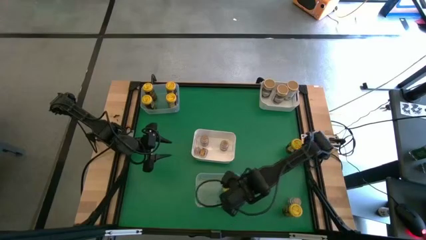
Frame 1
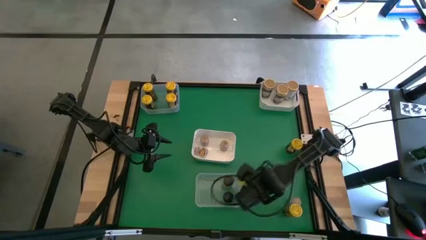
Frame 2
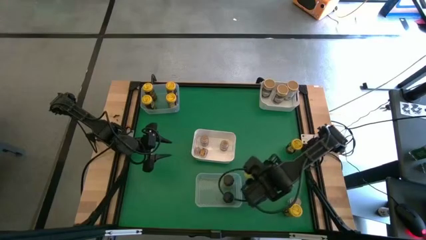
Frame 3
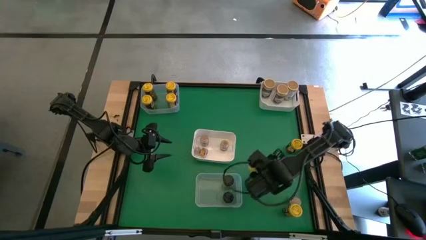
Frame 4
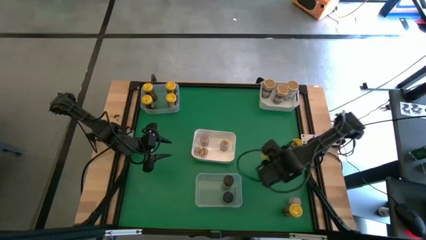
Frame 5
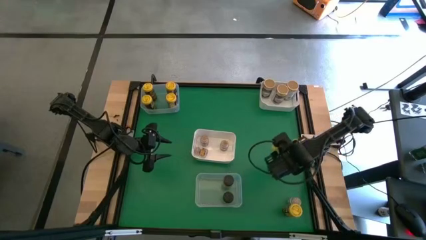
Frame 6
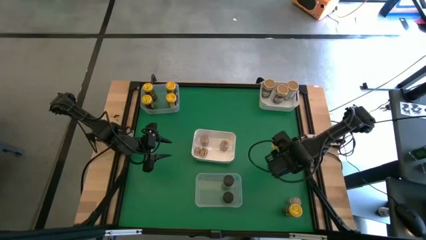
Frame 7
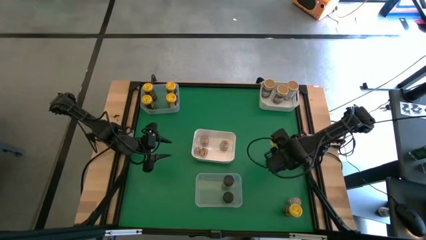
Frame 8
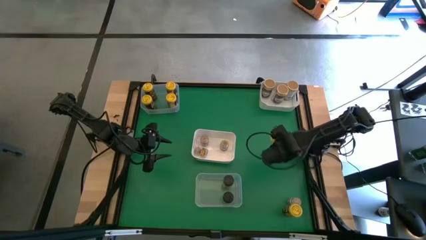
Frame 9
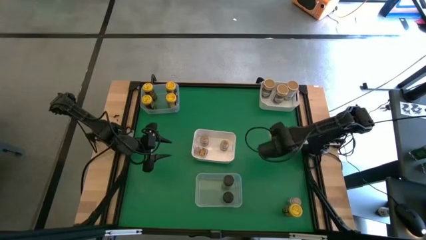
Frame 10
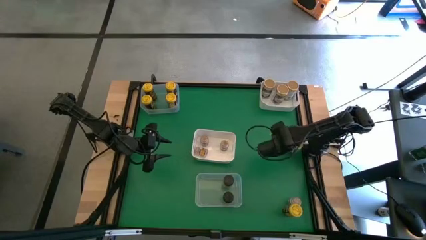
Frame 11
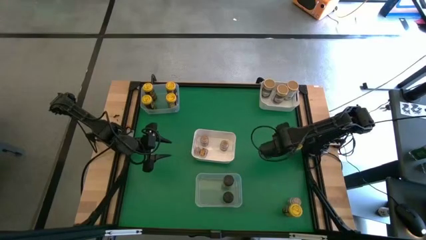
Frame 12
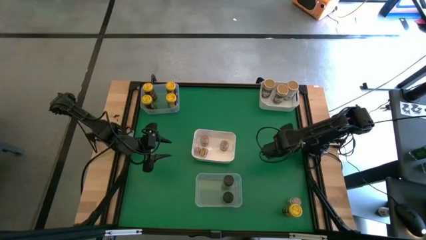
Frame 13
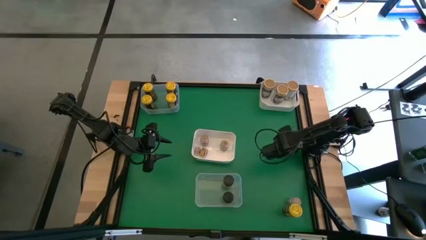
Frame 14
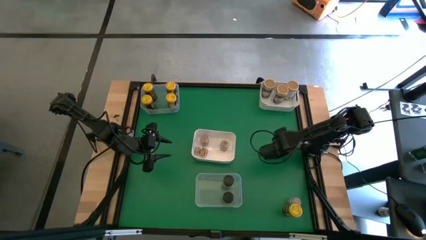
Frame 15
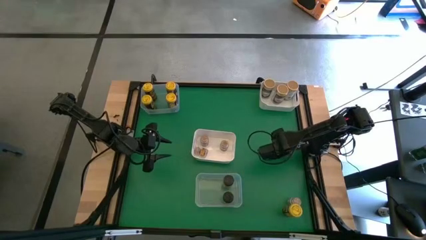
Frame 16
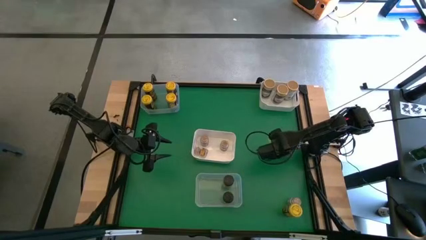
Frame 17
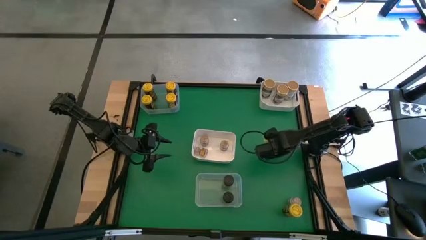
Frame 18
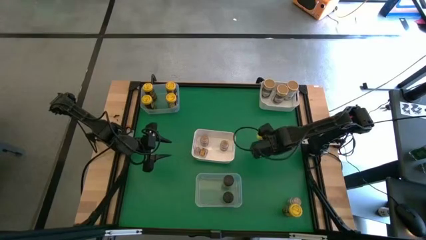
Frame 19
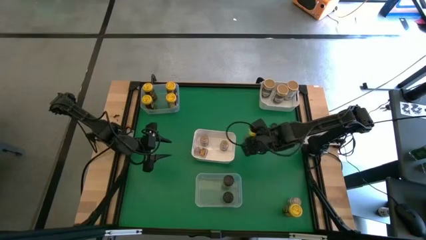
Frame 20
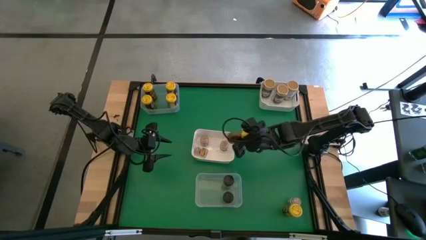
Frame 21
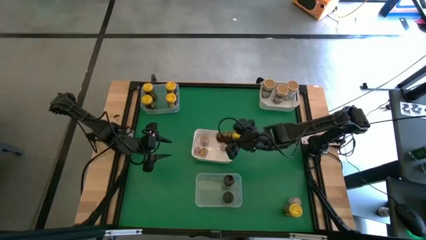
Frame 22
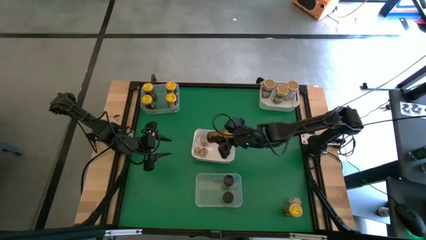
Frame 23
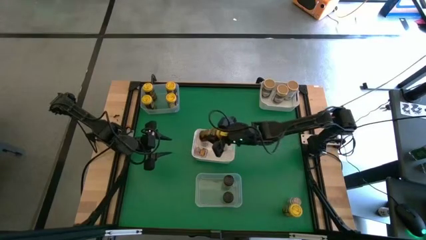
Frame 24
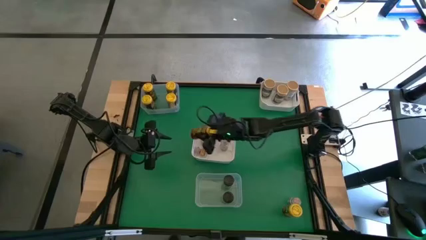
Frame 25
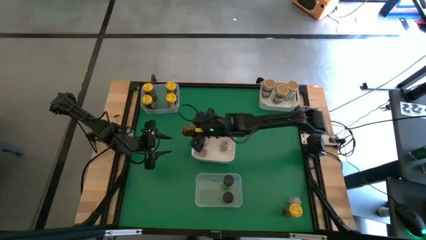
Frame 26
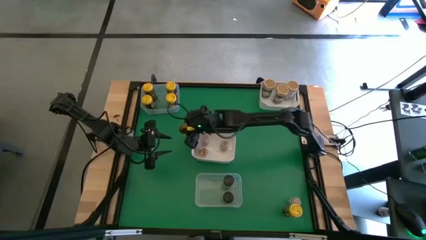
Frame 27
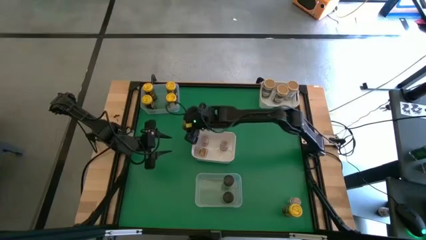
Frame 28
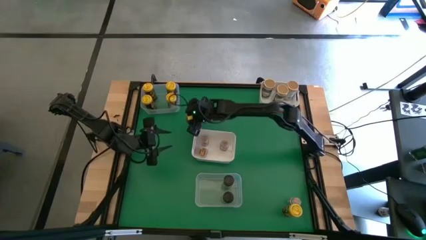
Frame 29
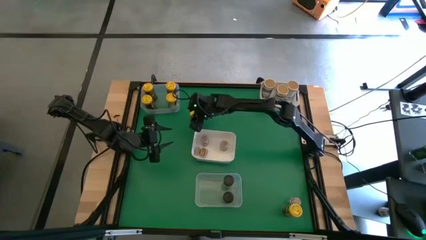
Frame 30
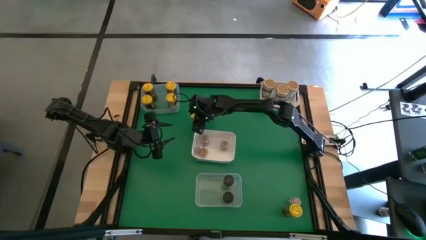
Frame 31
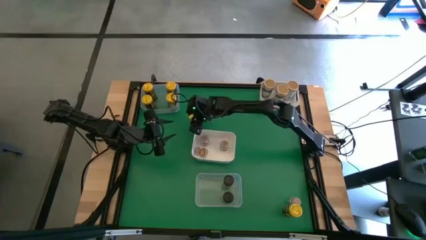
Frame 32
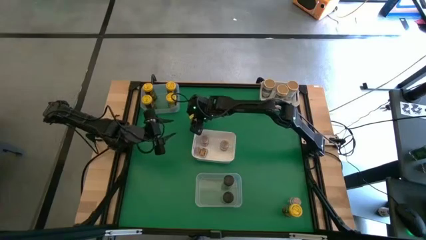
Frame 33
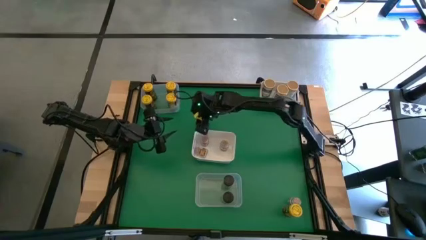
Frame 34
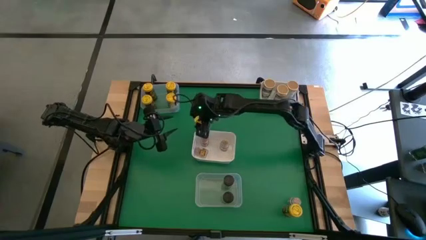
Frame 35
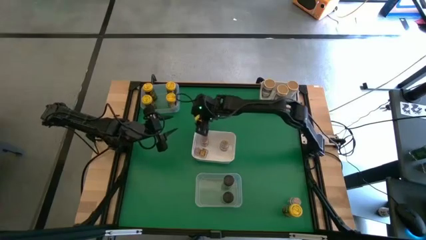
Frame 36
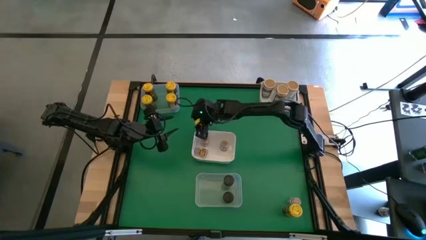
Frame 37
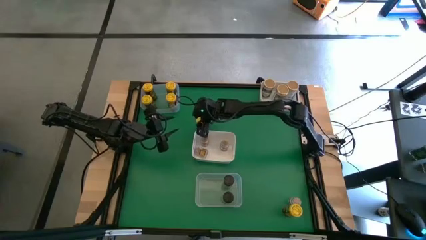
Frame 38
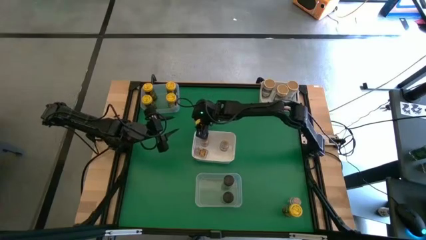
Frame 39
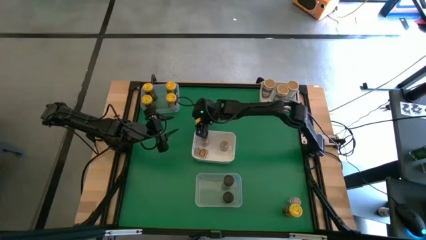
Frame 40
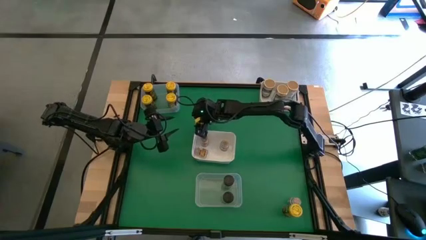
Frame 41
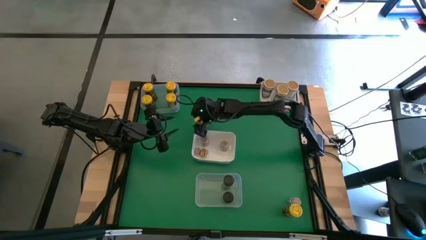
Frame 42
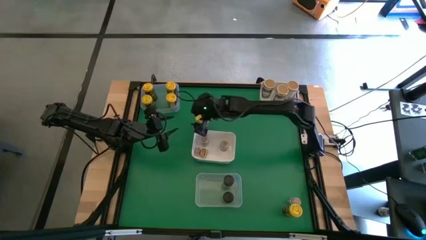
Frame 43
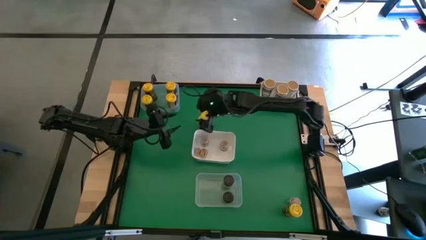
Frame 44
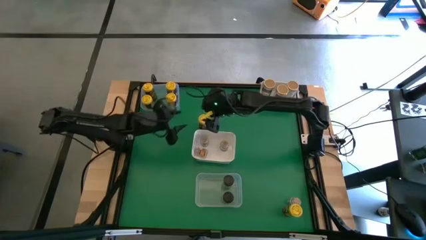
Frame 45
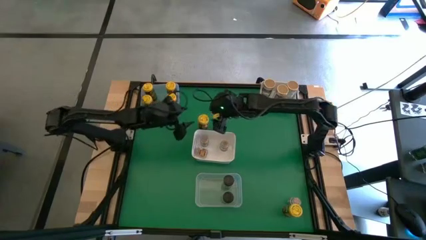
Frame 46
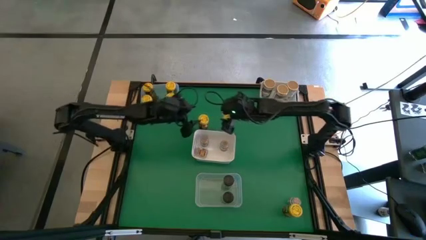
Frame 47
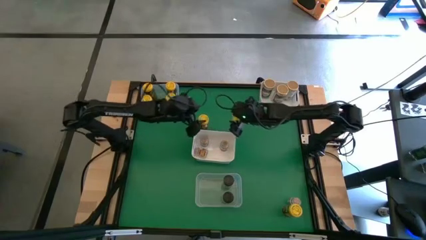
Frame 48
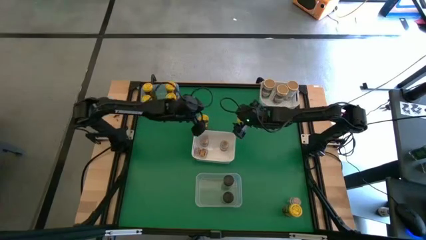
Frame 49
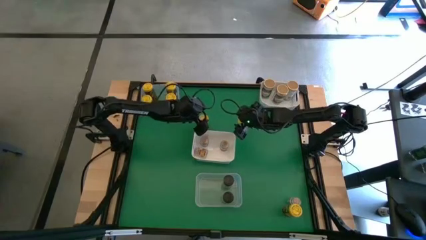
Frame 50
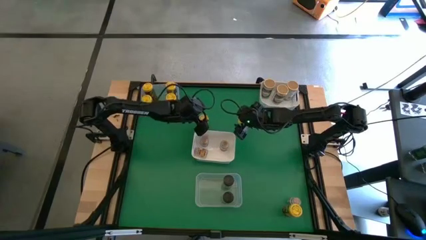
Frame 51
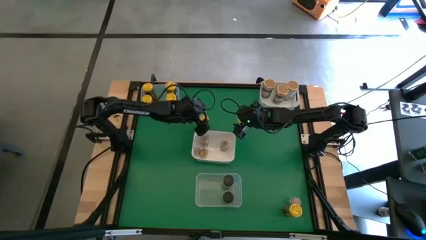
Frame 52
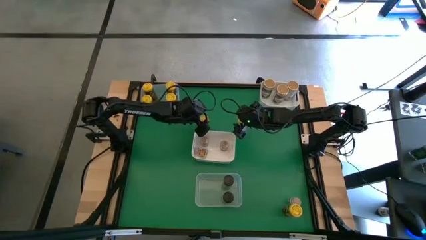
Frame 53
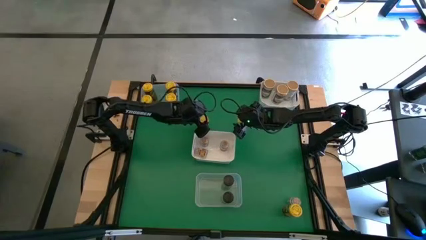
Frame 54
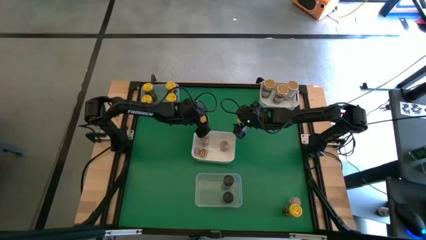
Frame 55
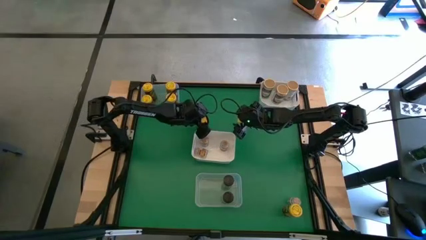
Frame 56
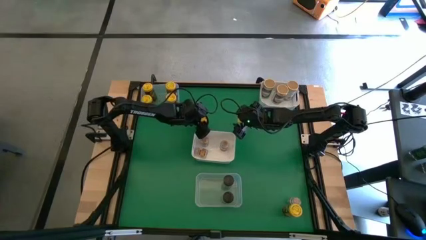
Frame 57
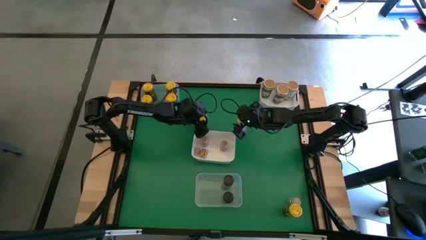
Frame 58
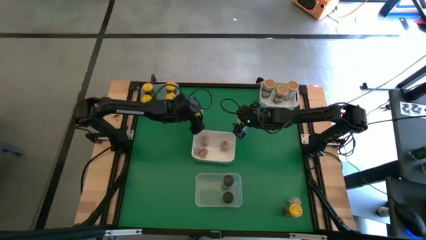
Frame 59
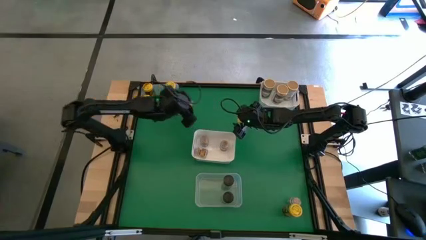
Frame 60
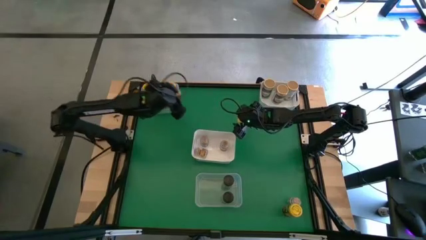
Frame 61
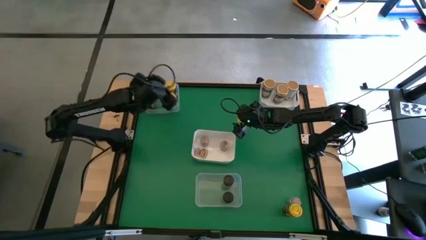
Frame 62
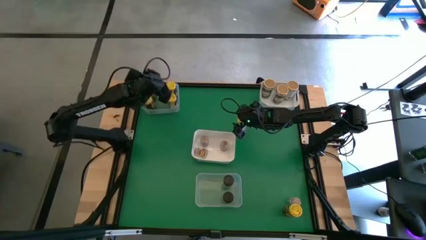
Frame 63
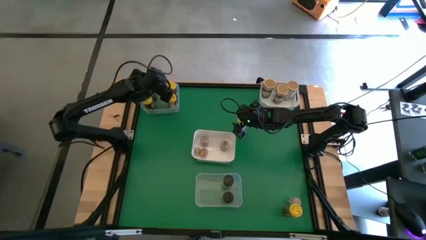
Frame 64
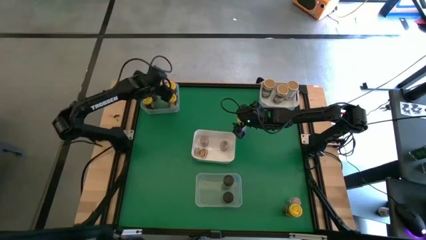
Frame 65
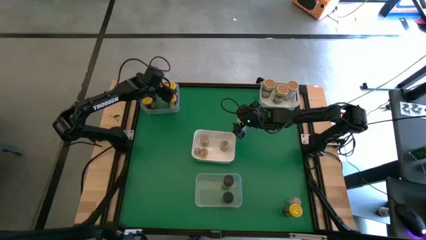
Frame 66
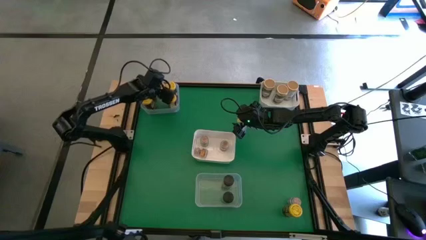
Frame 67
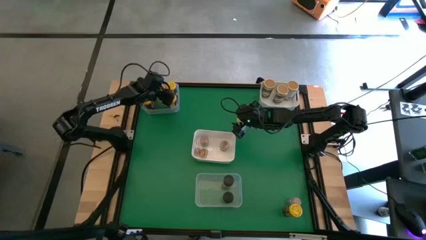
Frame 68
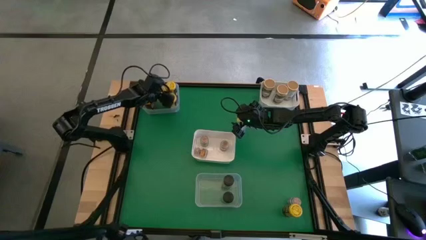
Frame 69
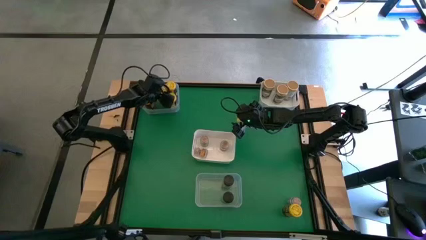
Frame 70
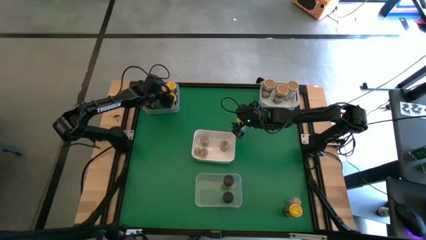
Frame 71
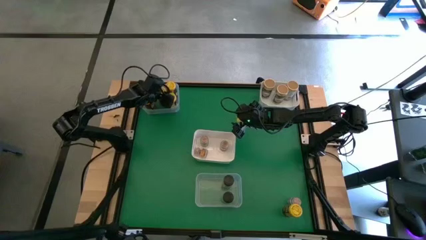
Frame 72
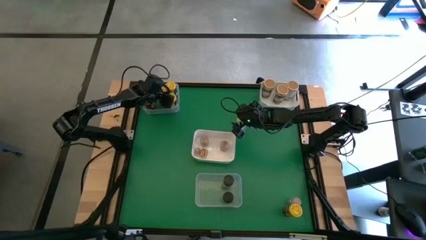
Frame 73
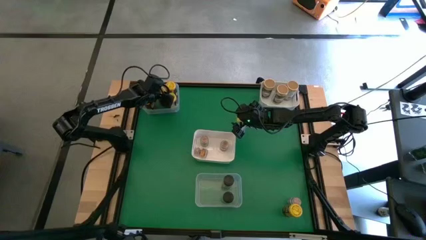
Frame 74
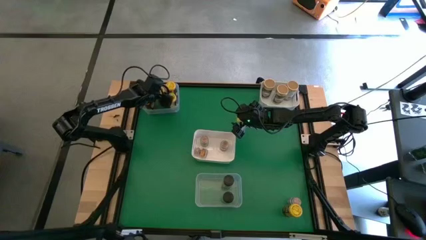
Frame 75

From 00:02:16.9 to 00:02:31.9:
Task: Sort spices by type
Put the top yellow seasoning bottle into the top transparent bin

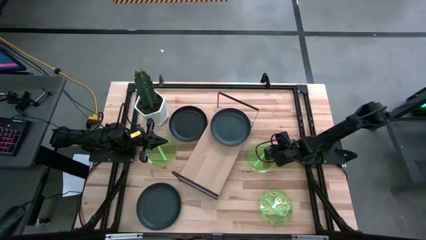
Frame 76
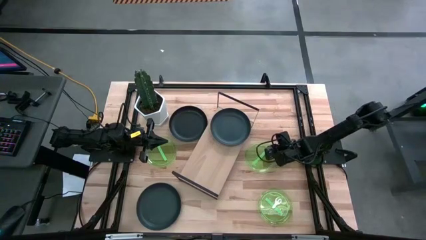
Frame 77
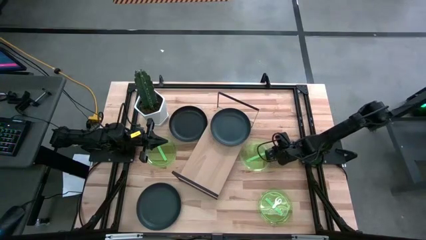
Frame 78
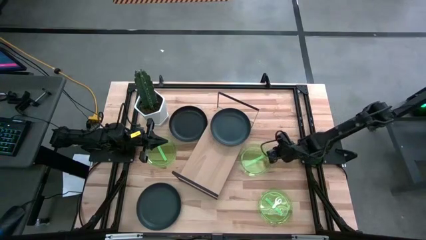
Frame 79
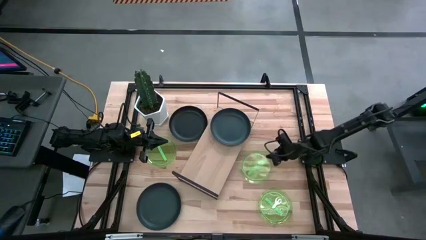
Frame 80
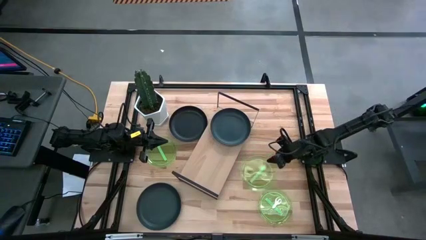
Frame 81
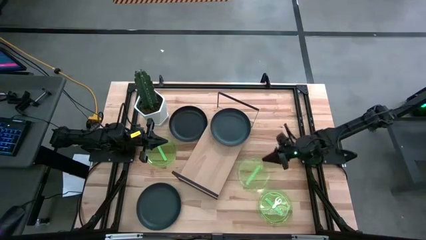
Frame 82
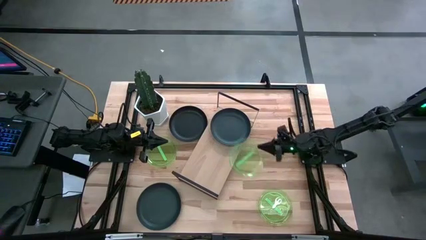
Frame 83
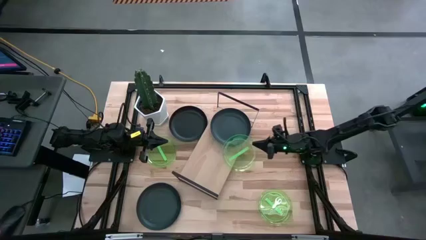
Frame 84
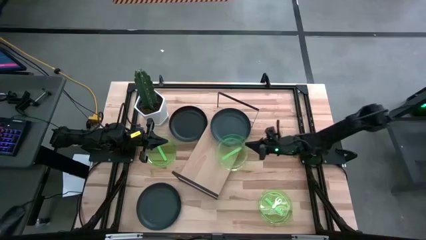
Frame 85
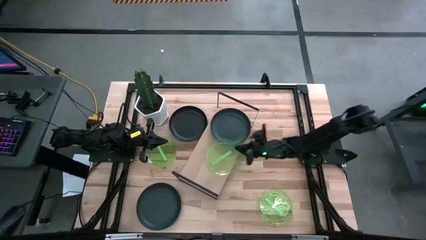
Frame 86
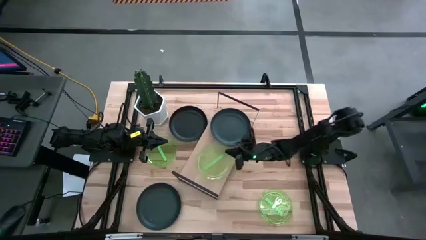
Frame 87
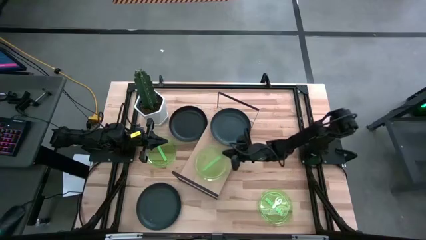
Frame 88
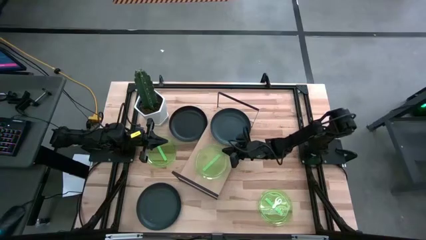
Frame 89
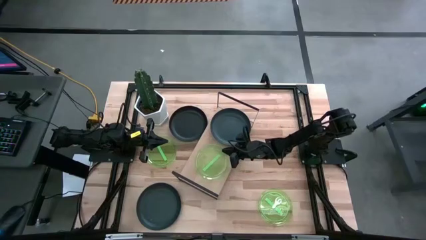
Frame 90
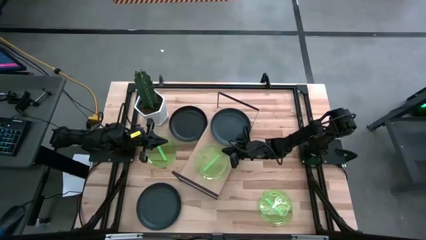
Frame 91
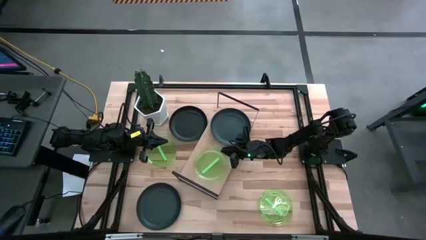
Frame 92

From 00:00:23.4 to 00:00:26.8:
Task: Place and stack plates onto a shelf
Put the top right green plate on the shelf
